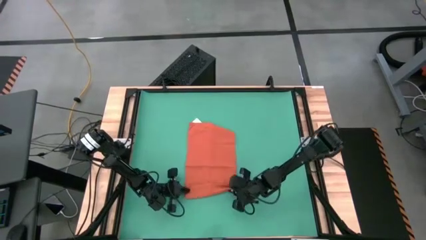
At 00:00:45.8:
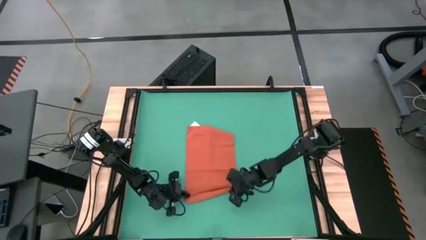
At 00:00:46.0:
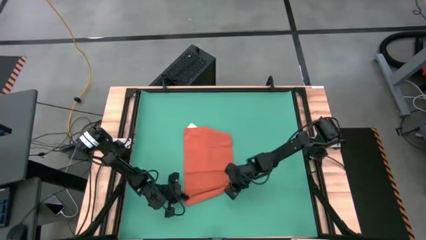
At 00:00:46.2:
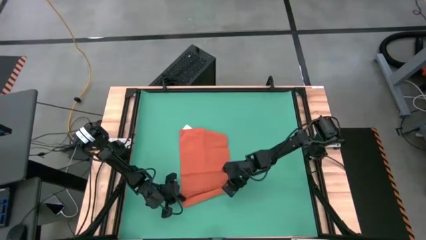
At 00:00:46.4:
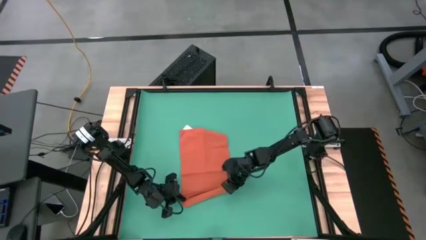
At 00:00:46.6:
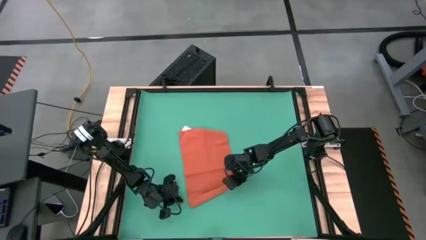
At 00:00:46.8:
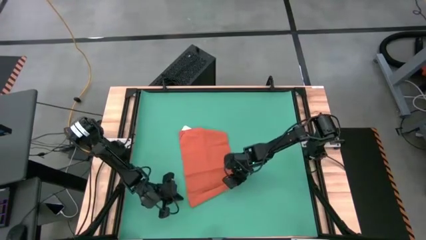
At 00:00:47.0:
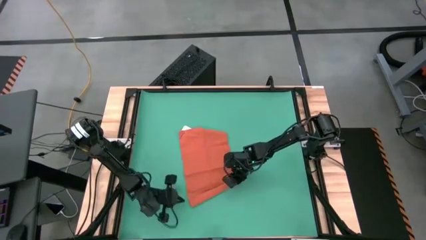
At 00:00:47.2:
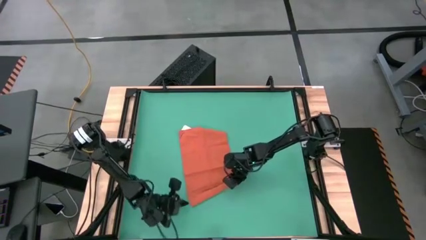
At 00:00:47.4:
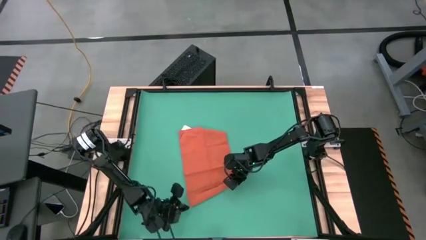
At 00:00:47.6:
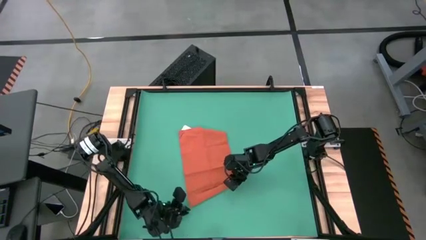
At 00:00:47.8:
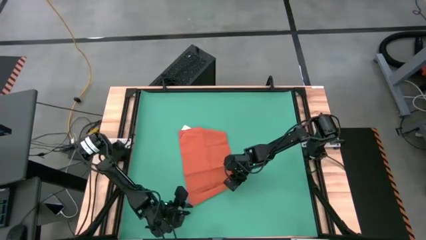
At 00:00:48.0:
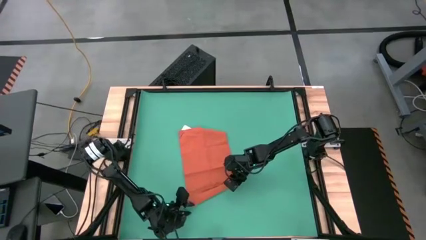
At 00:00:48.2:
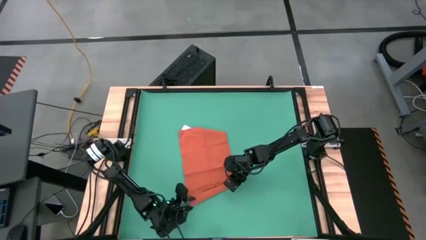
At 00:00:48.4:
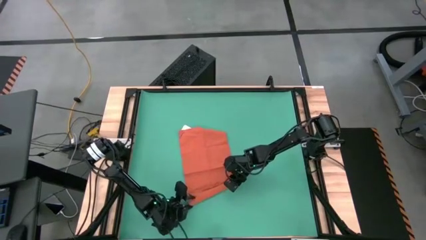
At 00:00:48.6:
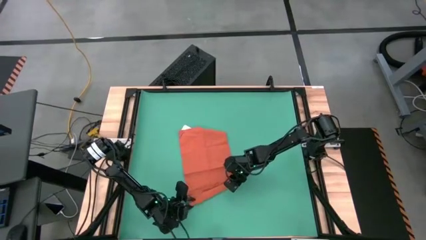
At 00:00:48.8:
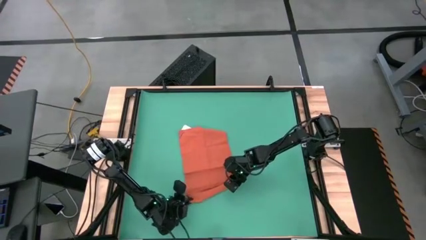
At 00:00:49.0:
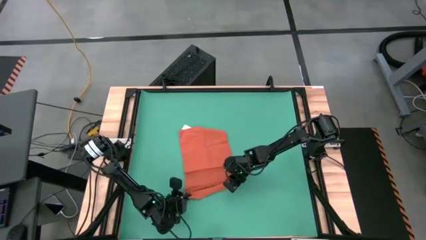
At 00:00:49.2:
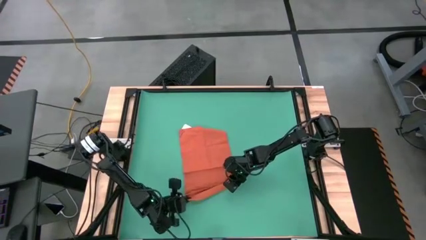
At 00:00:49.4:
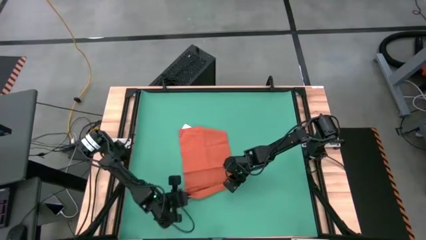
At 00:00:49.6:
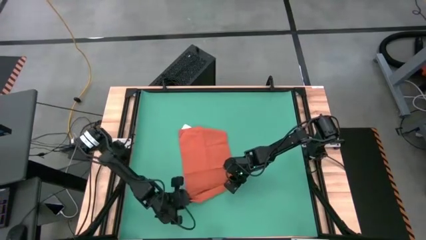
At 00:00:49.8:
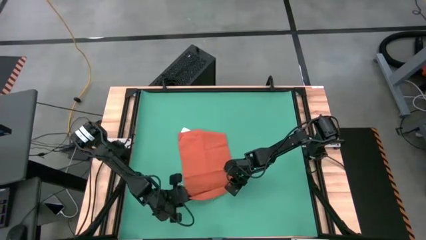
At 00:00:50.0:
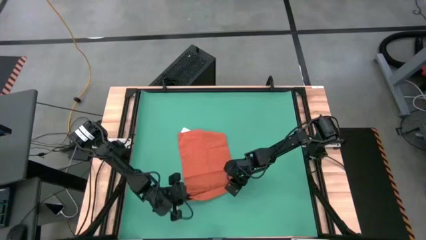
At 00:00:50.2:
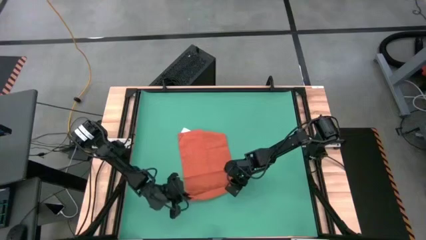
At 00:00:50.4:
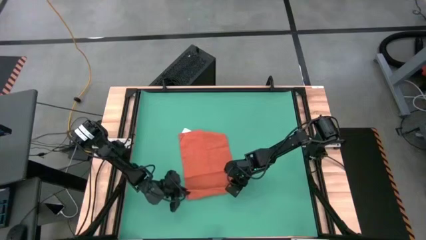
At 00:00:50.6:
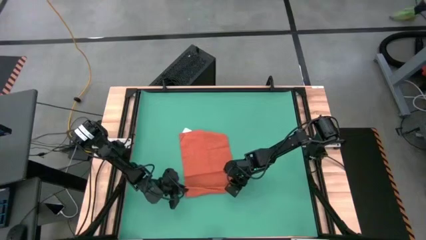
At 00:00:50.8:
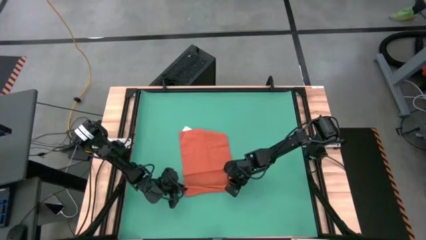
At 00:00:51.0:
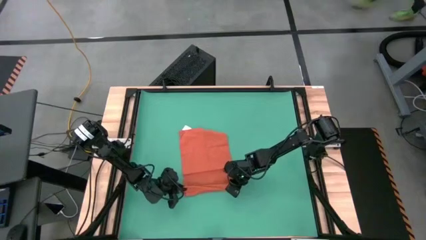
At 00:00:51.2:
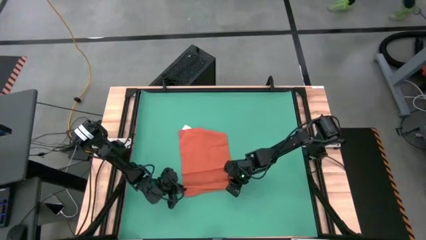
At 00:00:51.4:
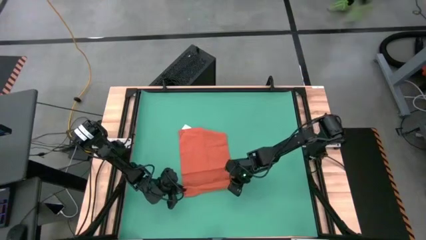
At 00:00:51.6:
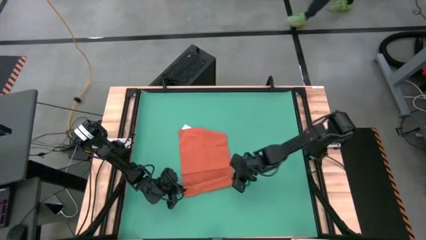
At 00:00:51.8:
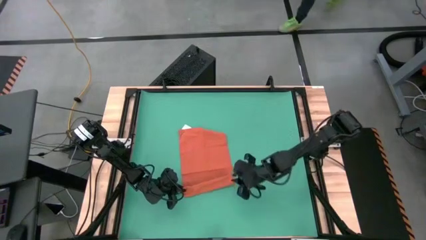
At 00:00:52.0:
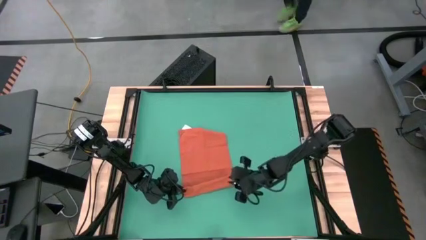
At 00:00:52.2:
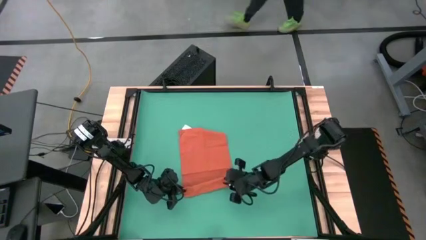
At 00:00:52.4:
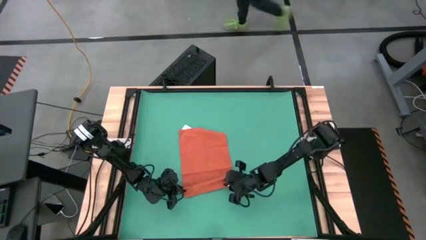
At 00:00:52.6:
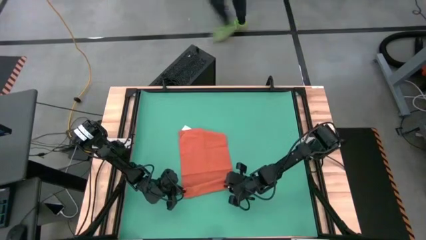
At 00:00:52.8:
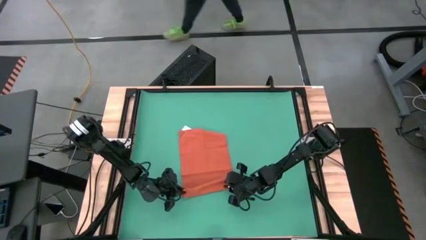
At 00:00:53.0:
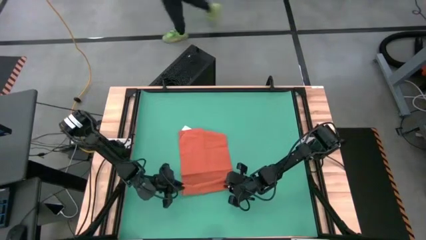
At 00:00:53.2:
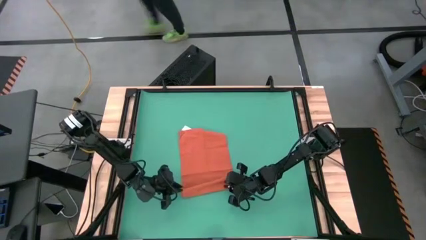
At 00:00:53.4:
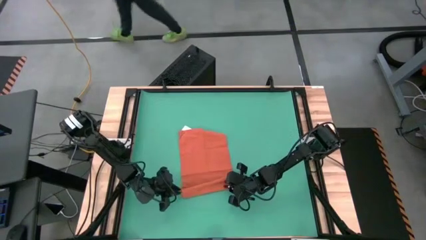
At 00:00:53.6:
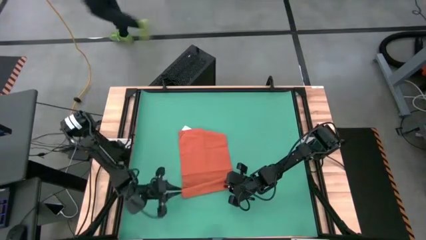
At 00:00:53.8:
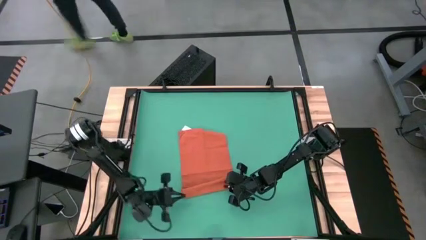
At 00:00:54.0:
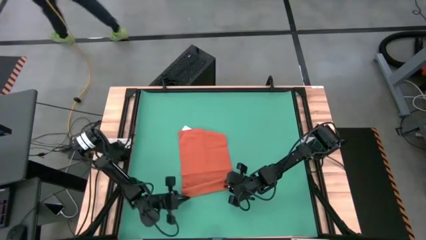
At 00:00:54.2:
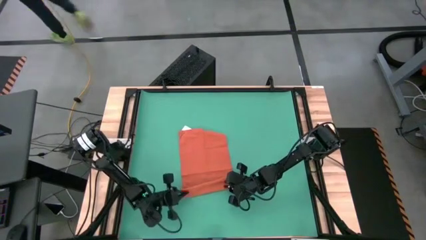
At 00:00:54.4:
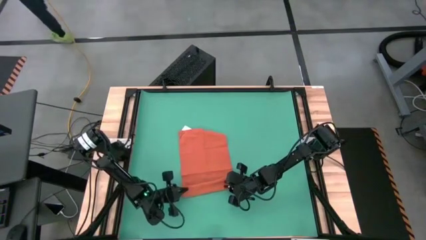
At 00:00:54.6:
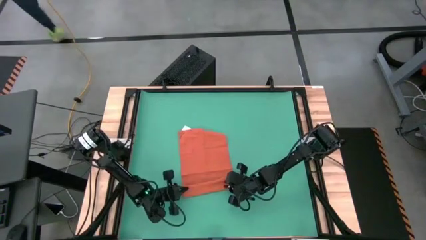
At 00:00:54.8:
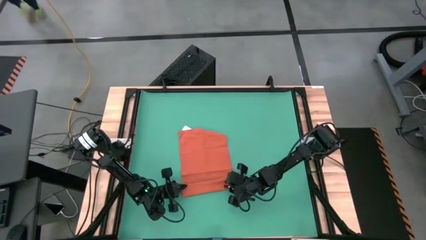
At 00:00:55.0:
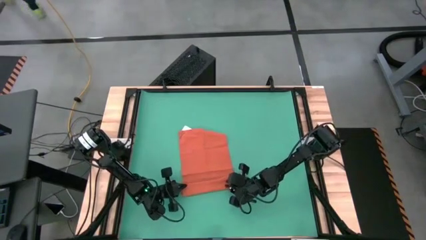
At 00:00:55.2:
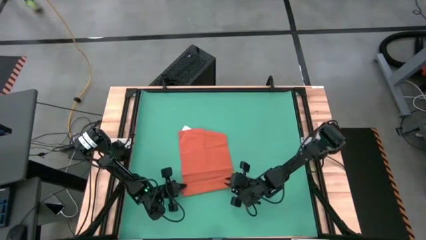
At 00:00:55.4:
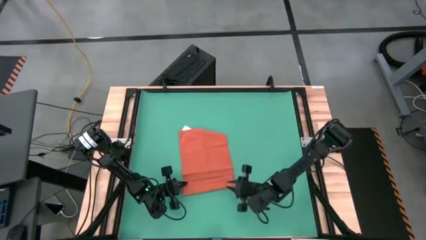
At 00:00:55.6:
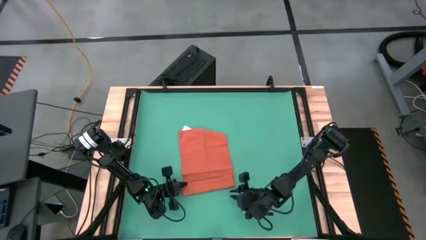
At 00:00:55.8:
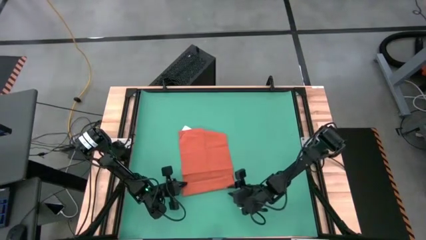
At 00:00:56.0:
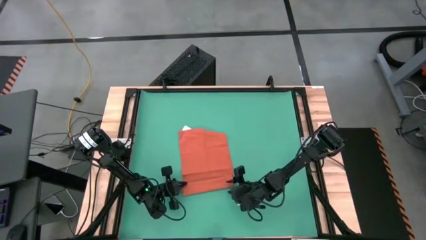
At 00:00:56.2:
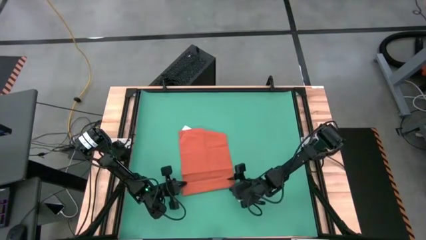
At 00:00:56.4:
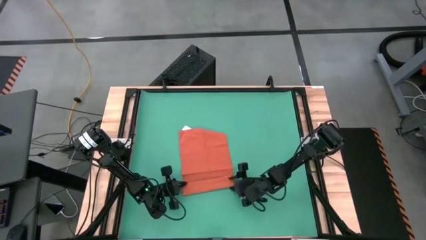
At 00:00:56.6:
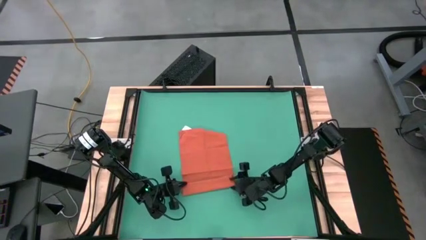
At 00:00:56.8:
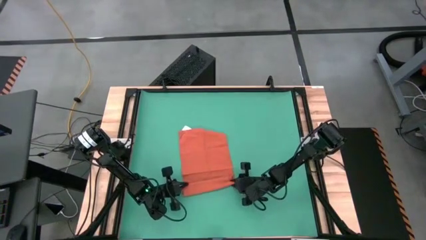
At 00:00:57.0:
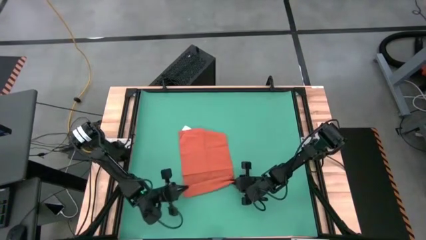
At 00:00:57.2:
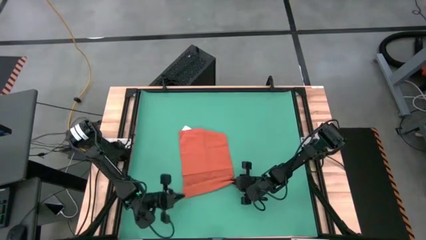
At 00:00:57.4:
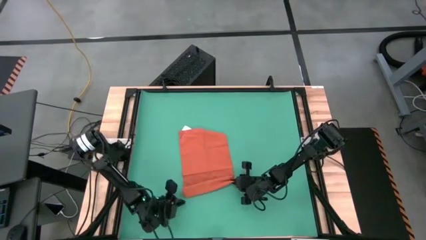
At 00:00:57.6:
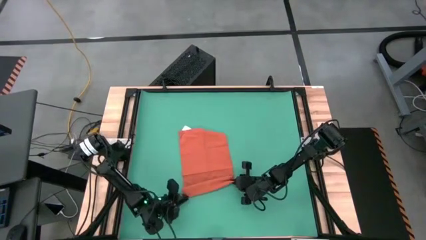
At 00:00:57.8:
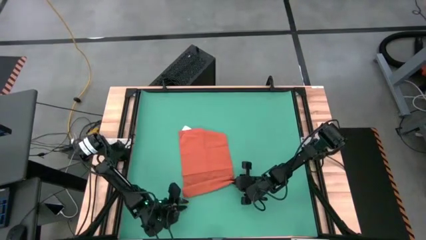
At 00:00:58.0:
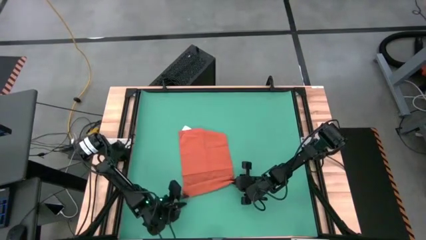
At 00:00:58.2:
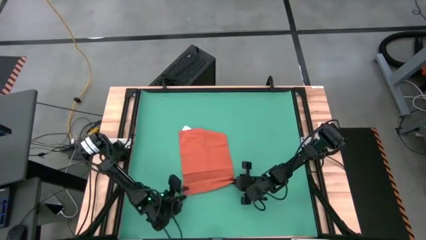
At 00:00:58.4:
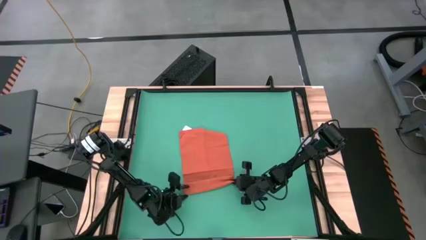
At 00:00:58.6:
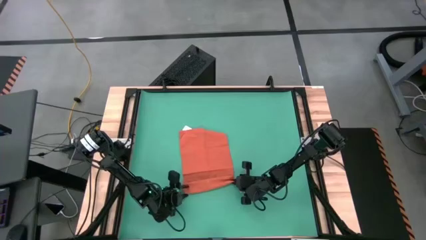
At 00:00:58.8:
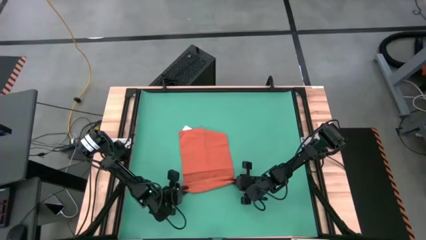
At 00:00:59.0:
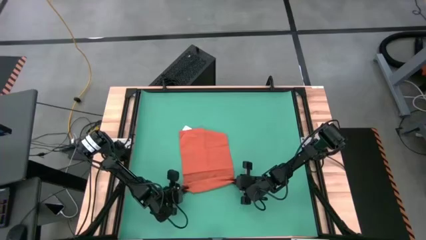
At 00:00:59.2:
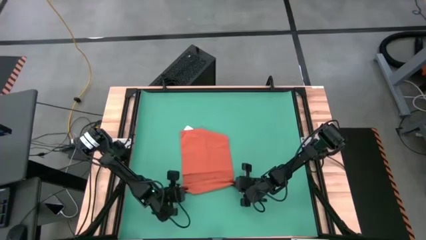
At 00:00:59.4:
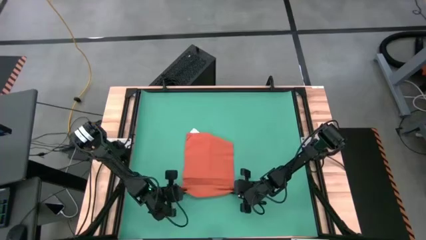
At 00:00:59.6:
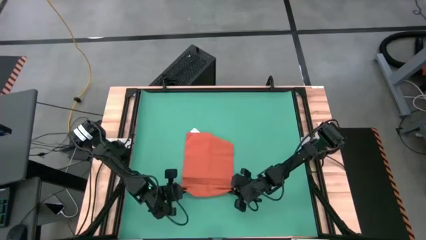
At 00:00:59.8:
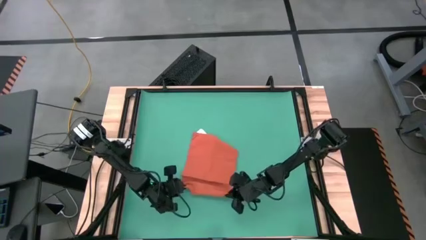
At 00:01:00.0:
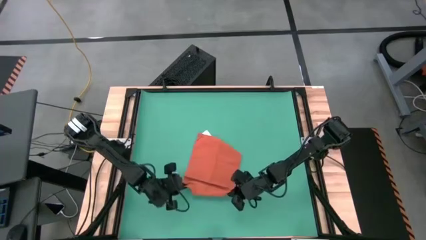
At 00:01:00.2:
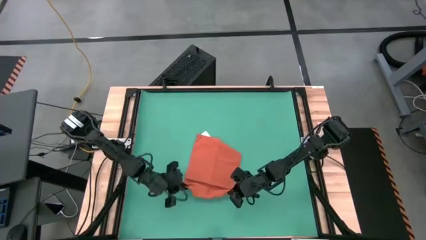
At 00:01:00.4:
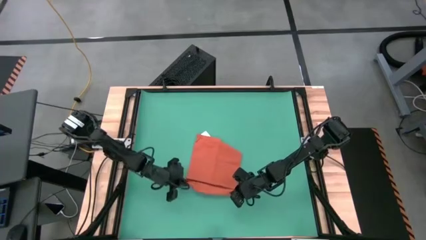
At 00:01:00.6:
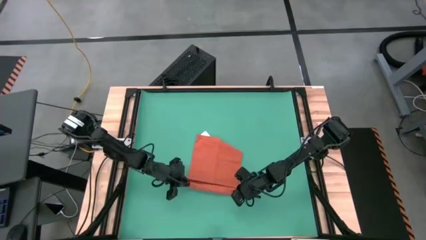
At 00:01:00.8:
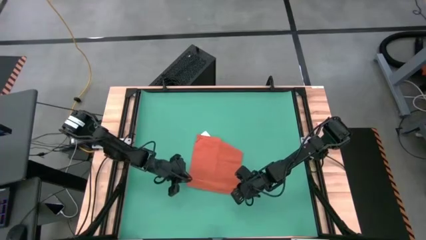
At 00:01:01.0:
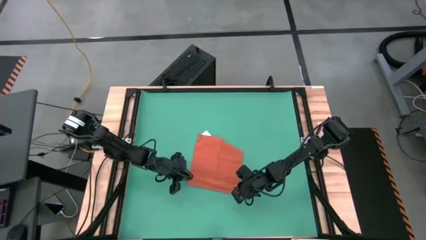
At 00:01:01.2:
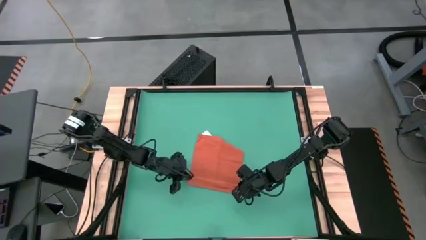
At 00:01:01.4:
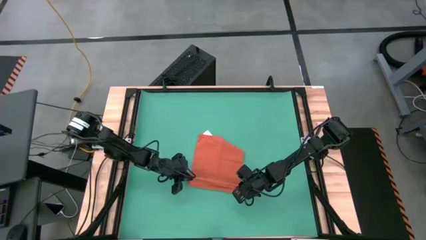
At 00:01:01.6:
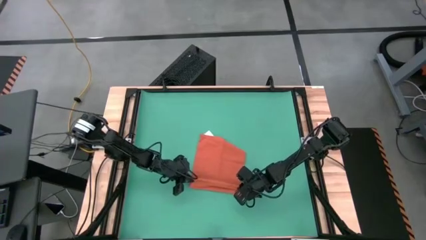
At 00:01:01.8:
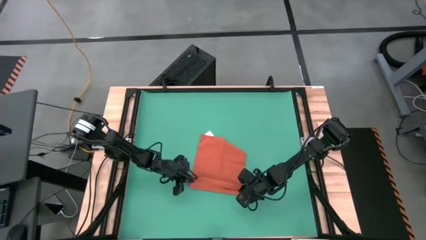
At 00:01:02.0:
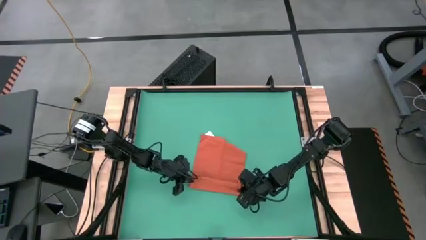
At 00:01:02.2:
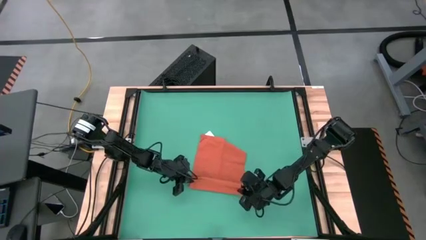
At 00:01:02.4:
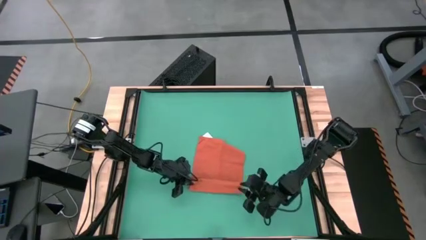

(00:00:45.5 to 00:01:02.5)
Task: Roll towel into tight, uniform cylinder
Roll the orange towel
